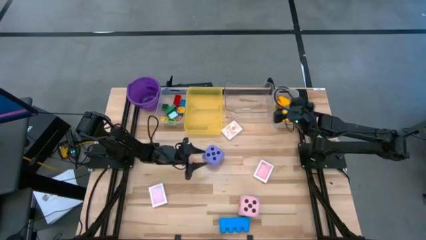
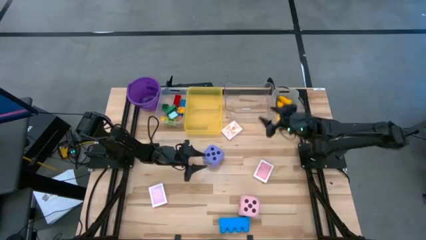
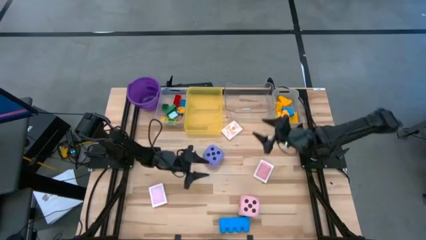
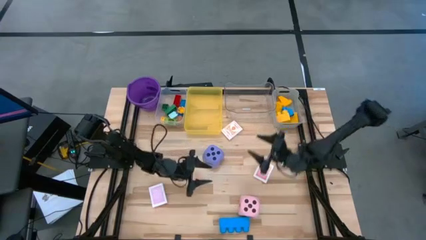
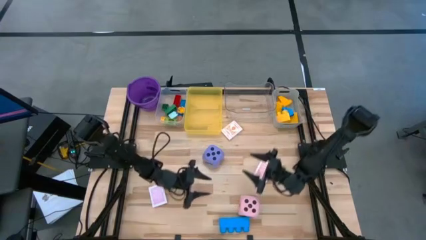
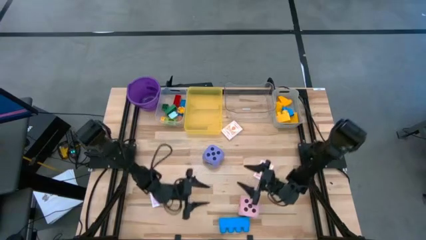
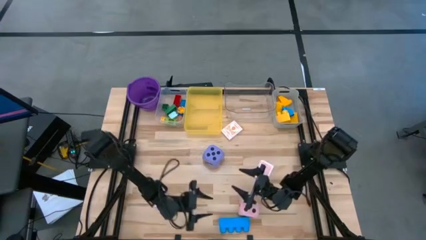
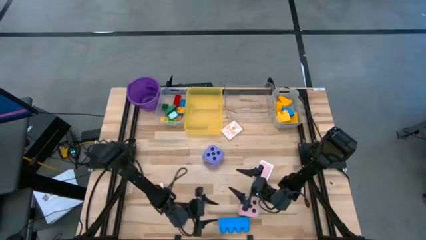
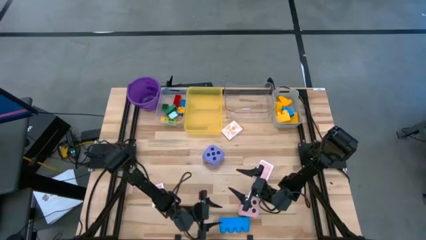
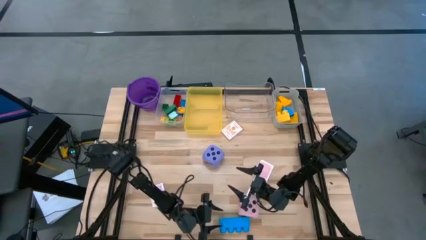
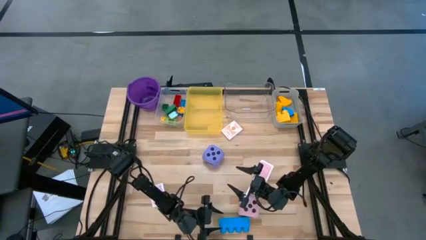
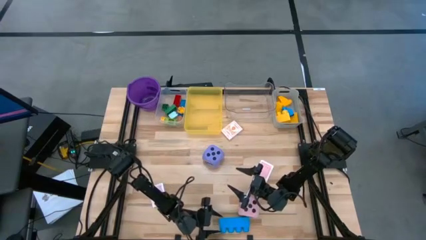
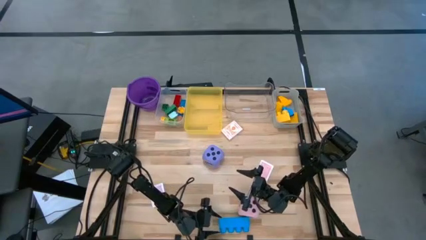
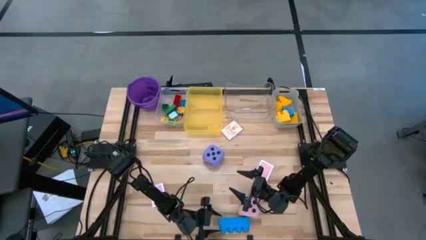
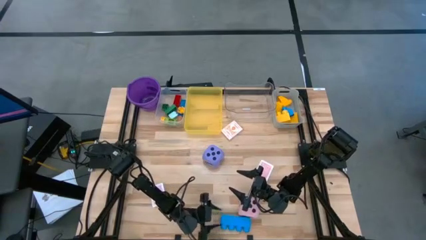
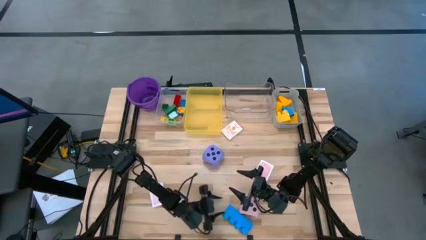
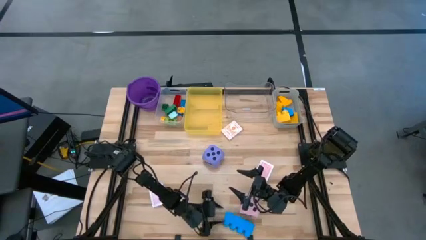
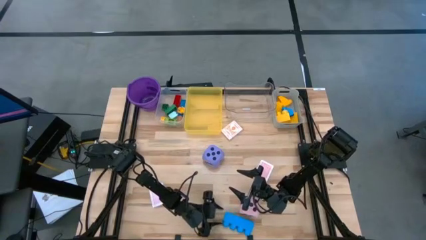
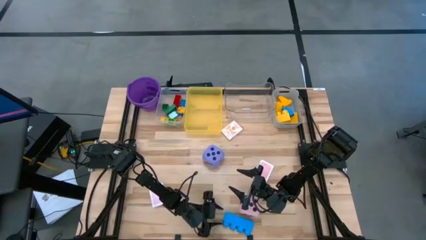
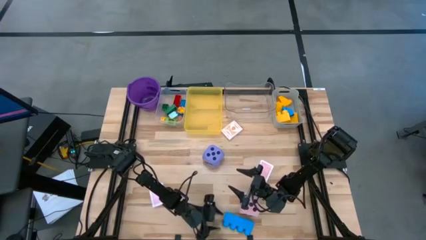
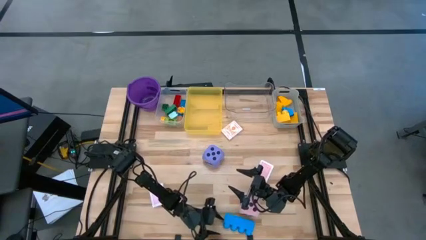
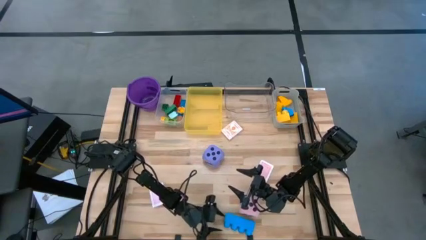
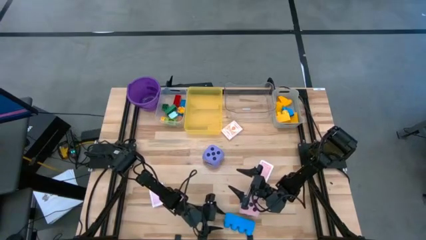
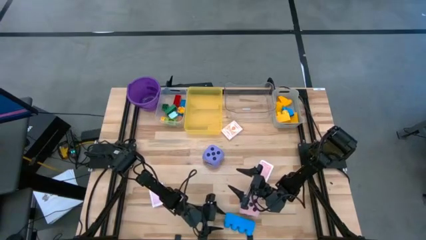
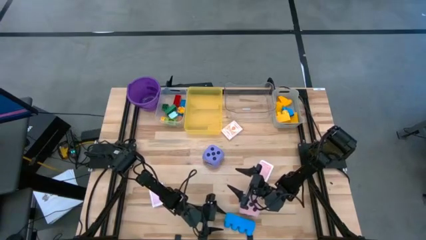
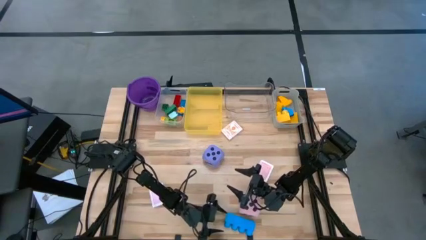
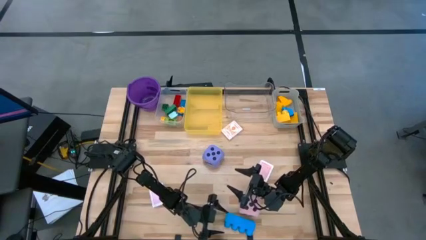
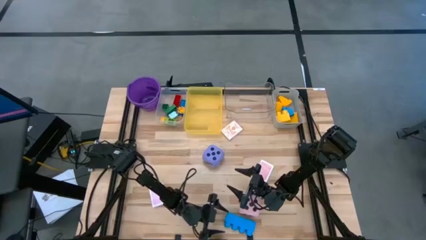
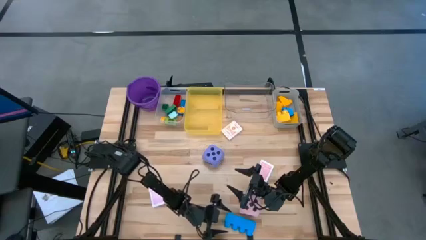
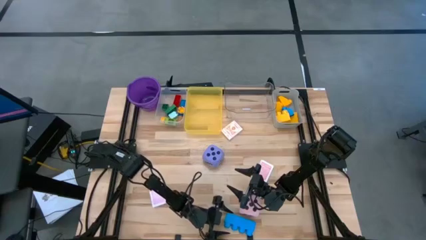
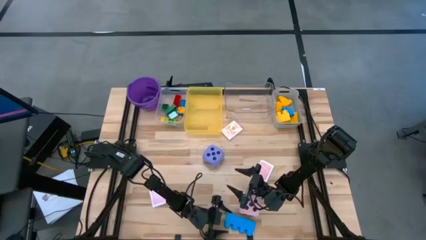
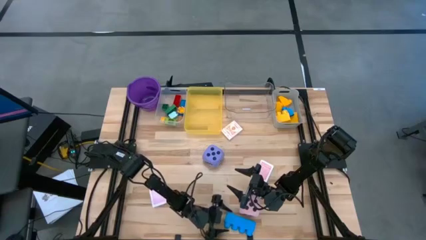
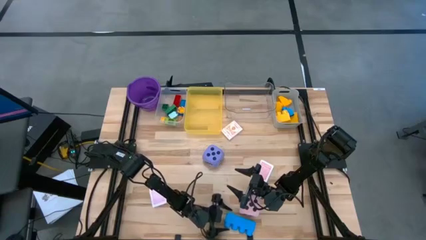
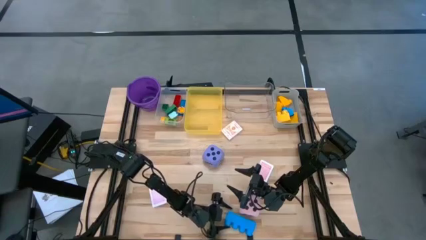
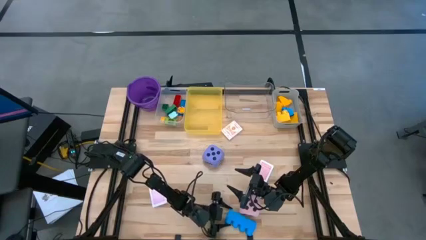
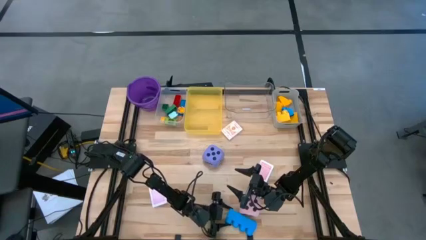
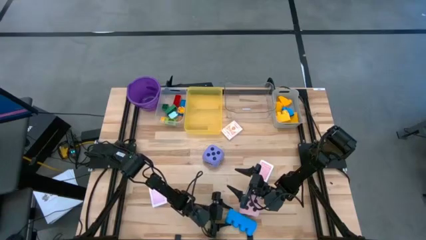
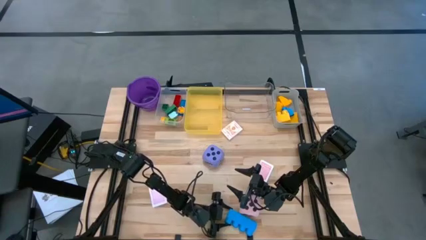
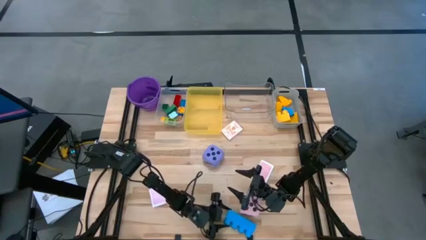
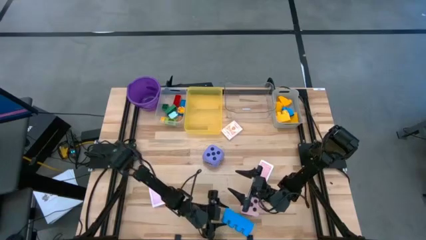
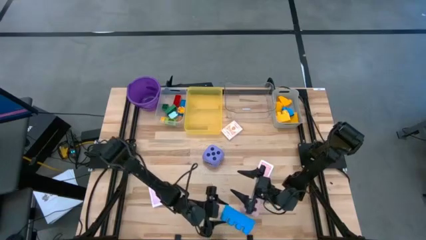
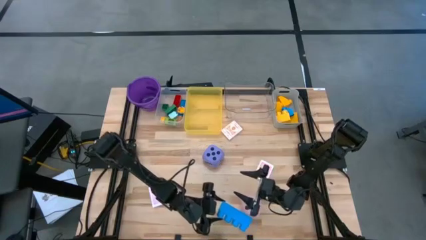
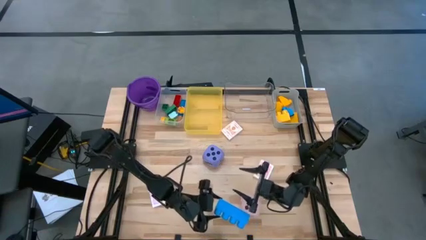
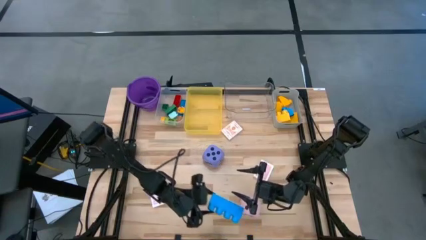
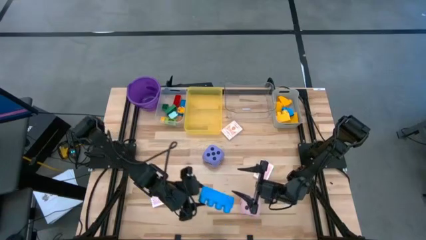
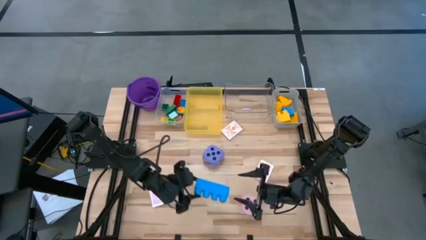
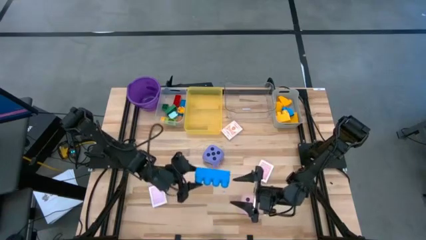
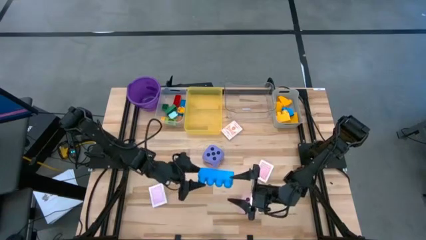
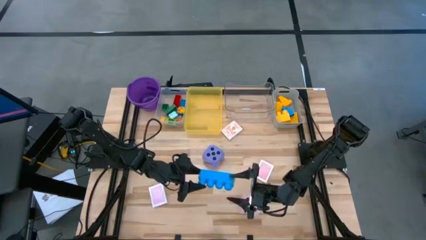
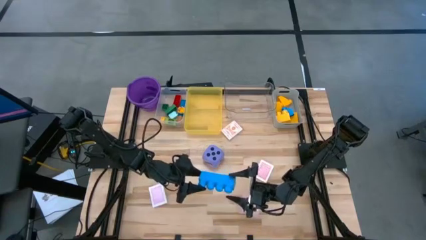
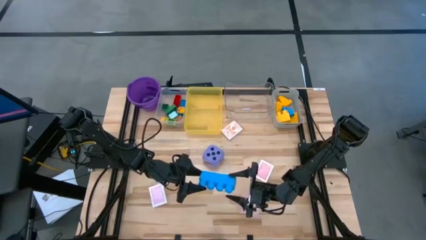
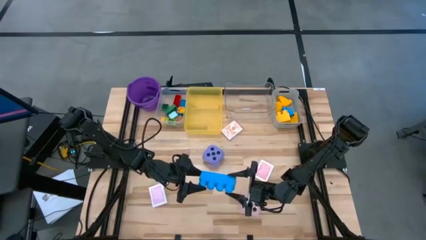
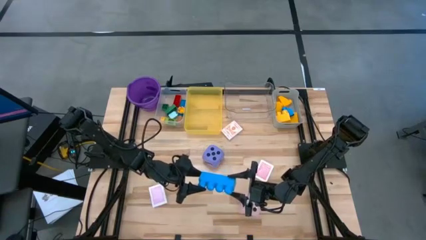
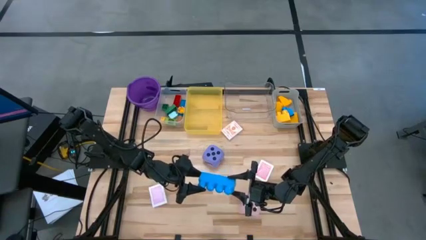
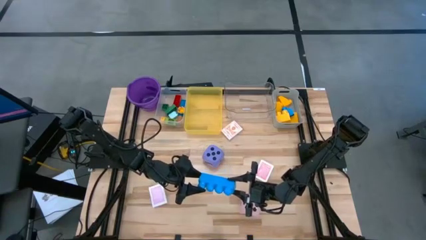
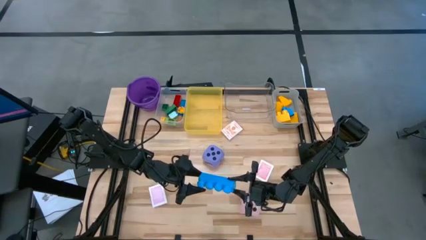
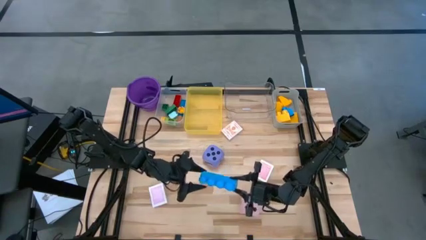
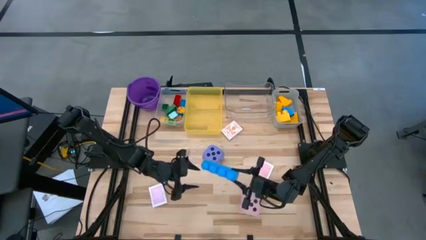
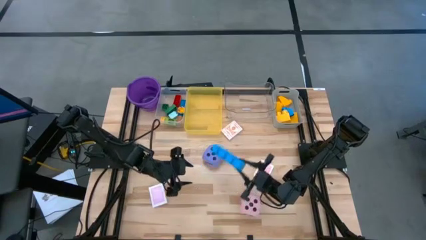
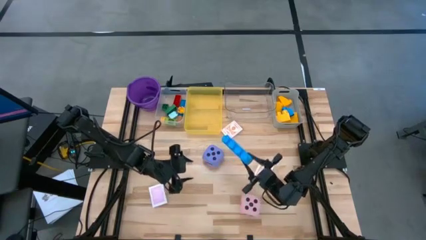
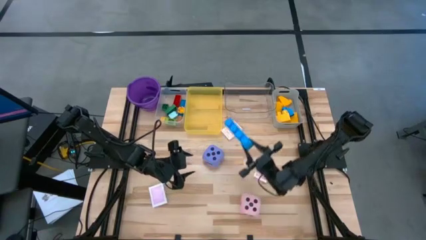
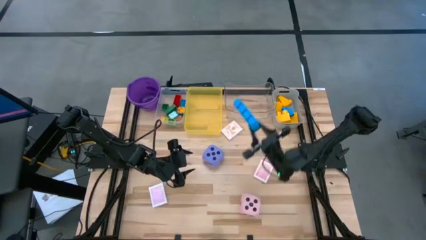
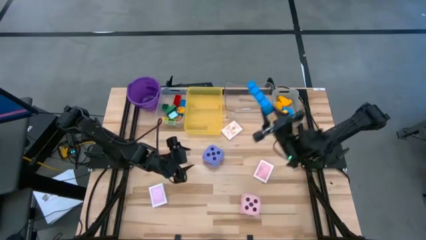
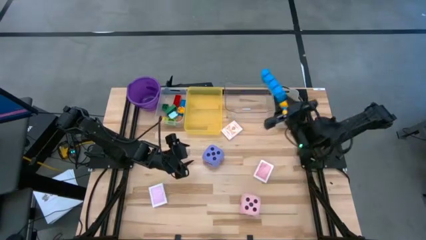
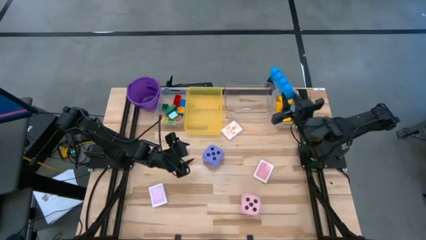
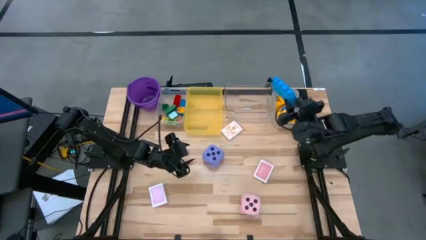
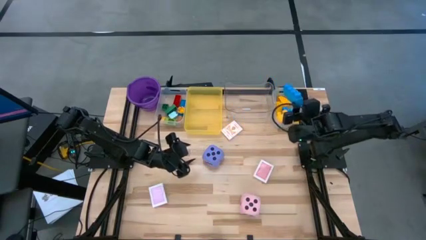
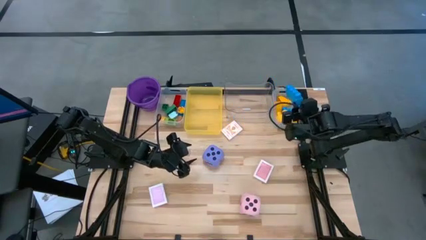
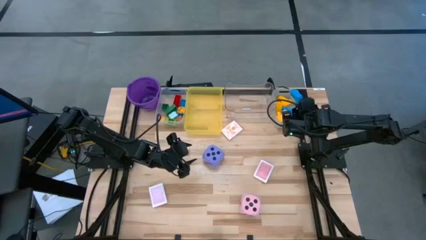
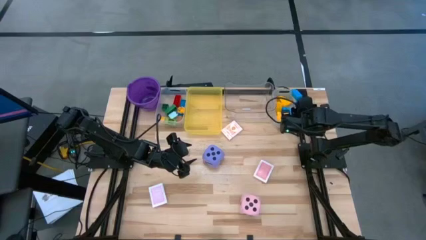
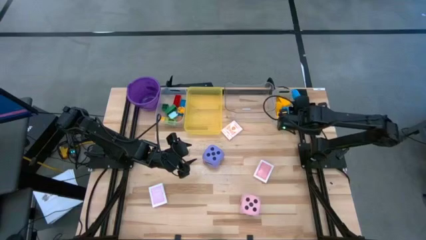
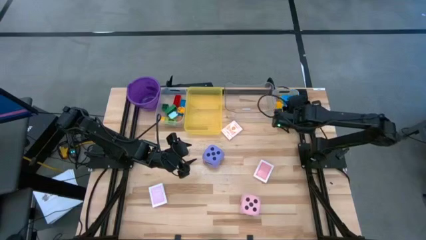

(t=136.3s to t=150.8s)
Task: Pick & Place Toys
Put the large blue game piece into the gray bin

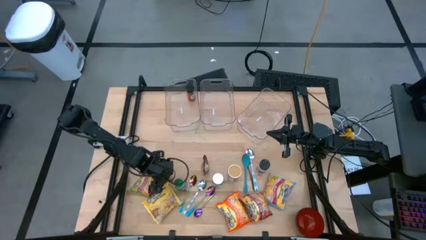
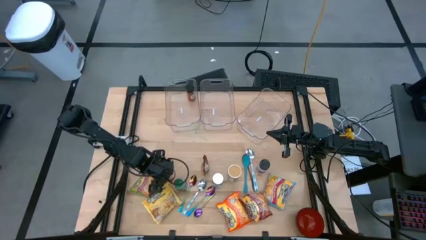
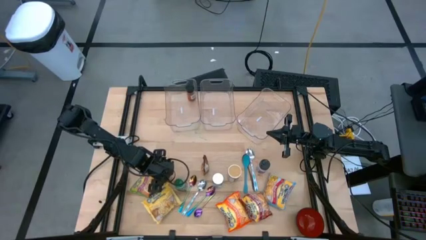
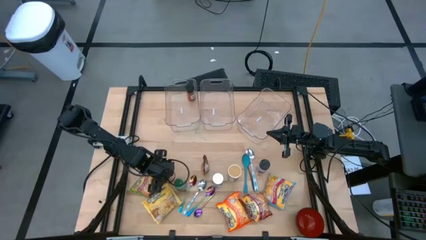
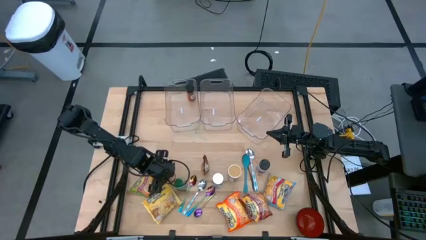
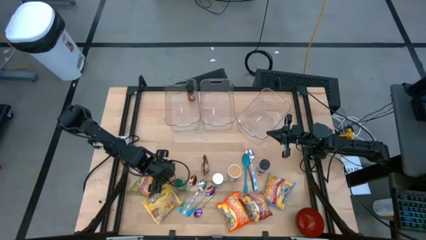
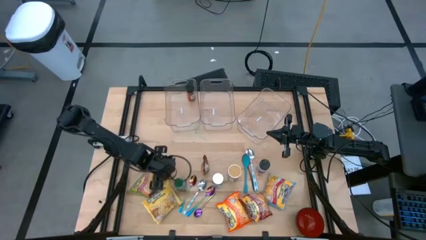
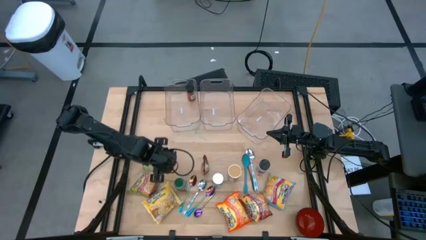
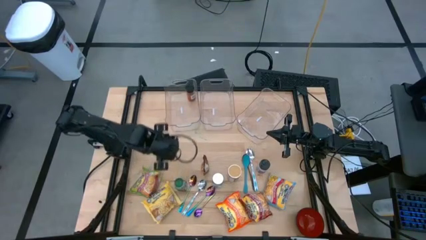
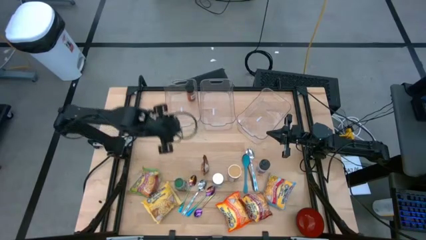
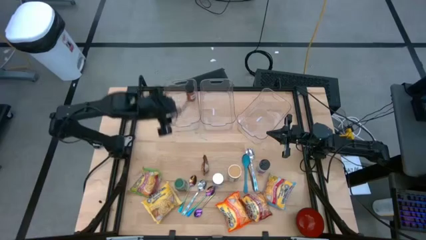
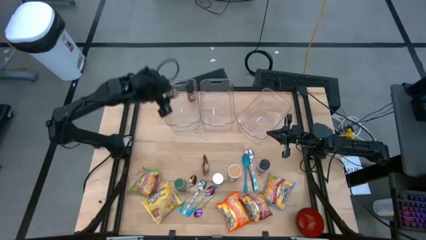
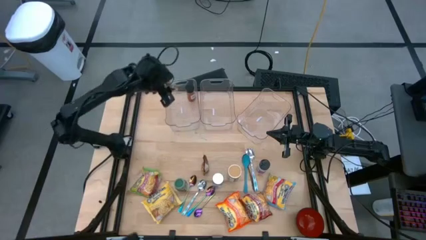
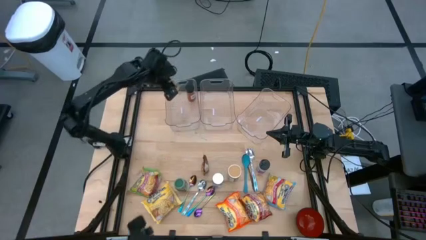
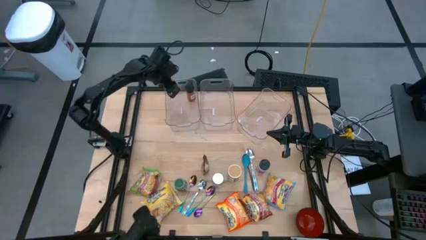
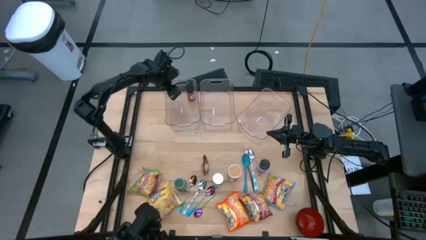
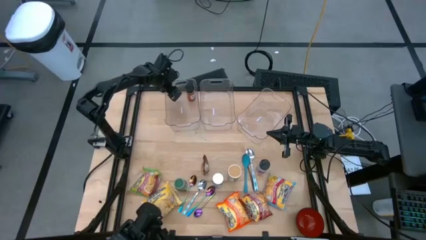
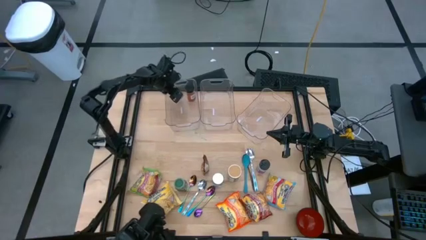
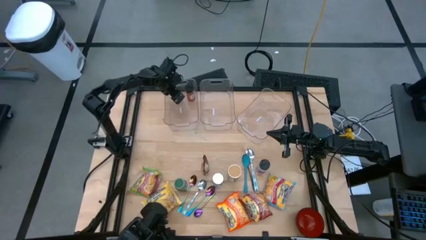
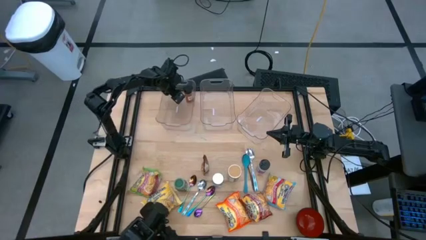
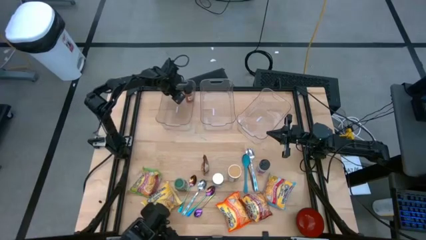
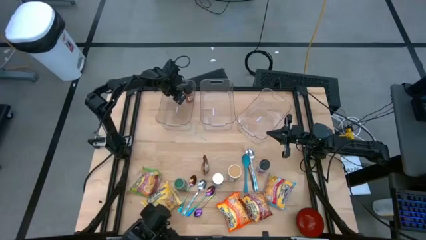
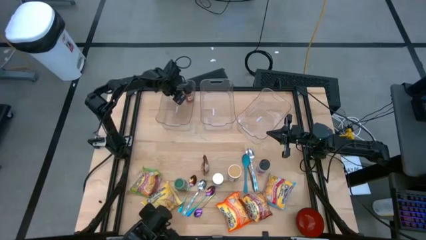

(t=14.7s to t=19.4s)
Task: Pick & Place Food Item
Put the brown seasoning bottle into the left transparent bin
